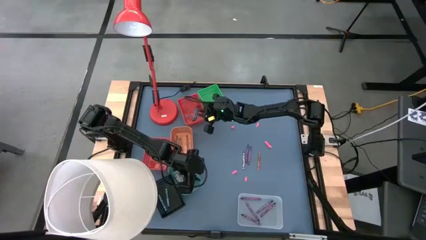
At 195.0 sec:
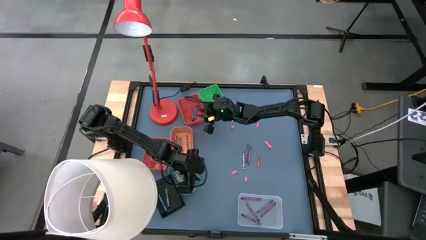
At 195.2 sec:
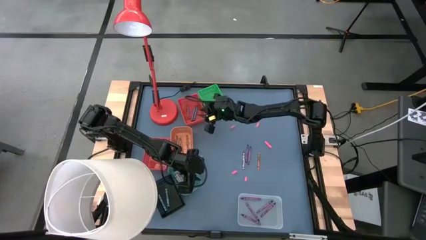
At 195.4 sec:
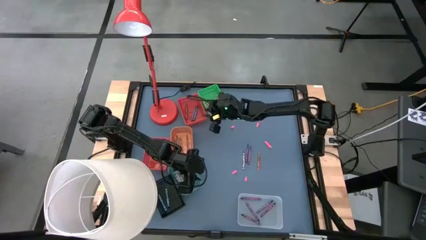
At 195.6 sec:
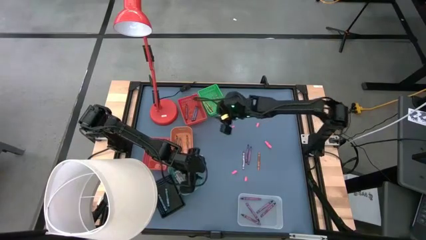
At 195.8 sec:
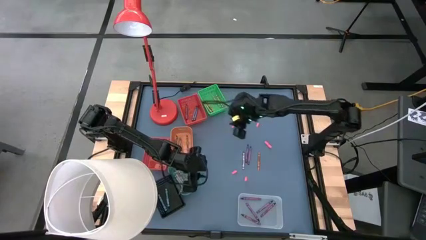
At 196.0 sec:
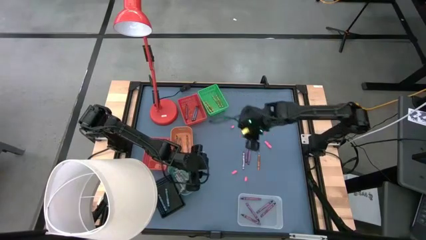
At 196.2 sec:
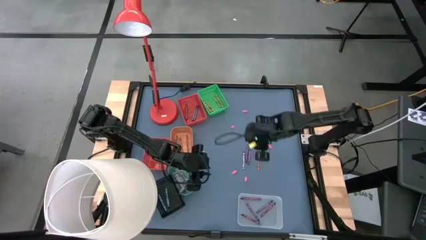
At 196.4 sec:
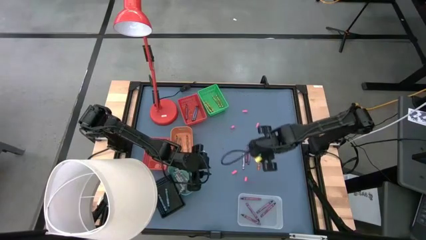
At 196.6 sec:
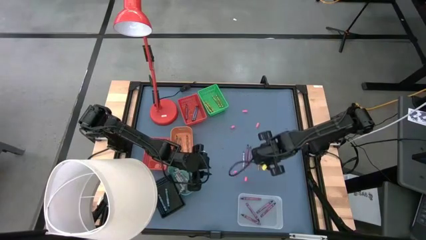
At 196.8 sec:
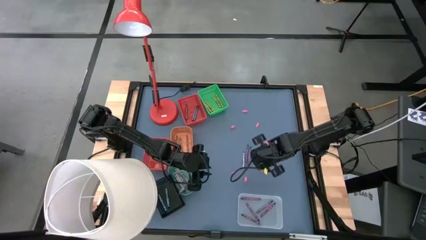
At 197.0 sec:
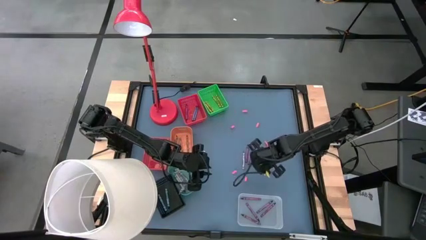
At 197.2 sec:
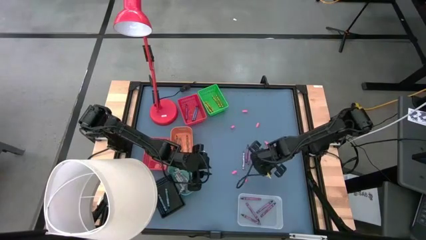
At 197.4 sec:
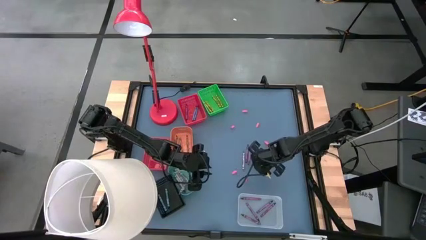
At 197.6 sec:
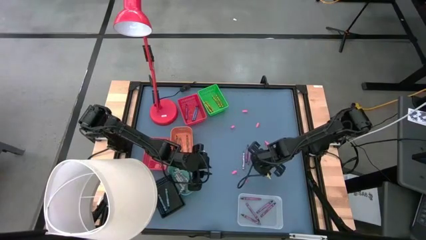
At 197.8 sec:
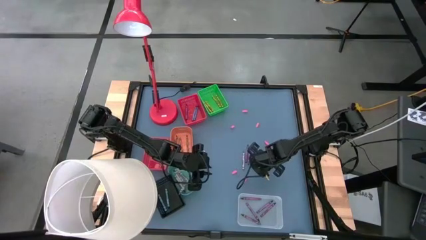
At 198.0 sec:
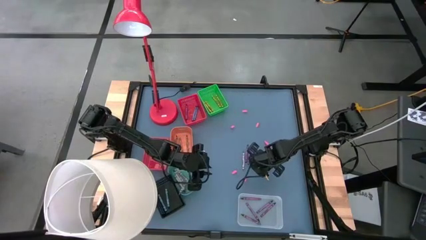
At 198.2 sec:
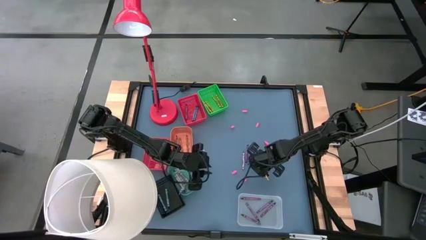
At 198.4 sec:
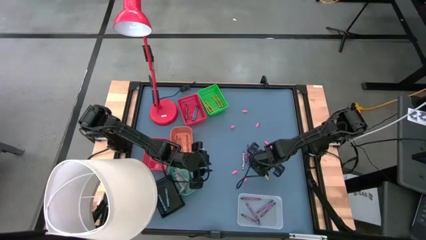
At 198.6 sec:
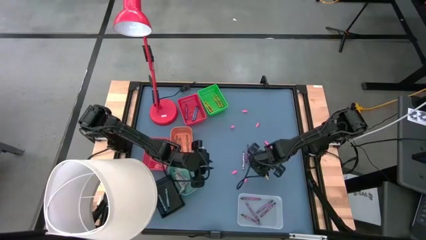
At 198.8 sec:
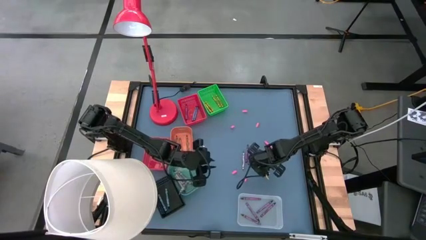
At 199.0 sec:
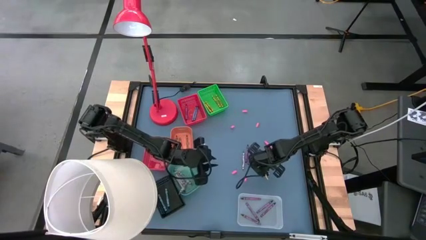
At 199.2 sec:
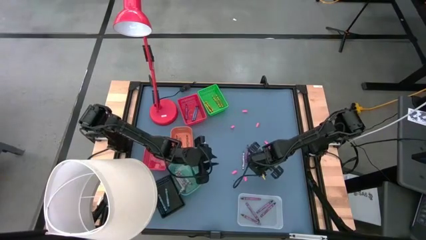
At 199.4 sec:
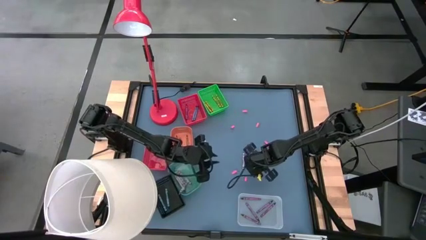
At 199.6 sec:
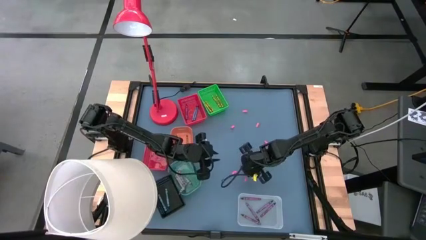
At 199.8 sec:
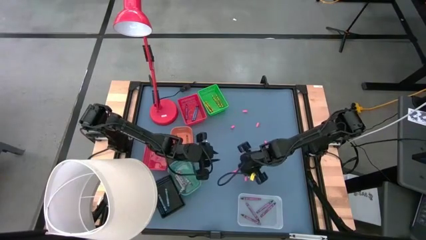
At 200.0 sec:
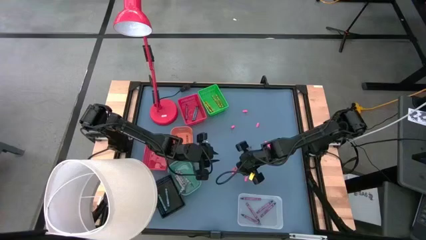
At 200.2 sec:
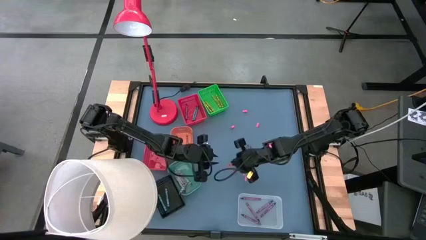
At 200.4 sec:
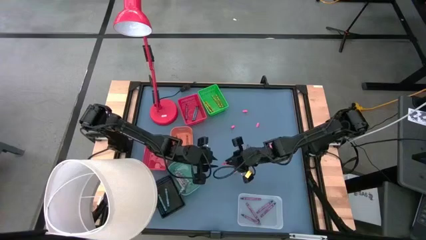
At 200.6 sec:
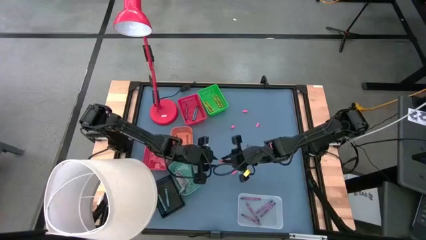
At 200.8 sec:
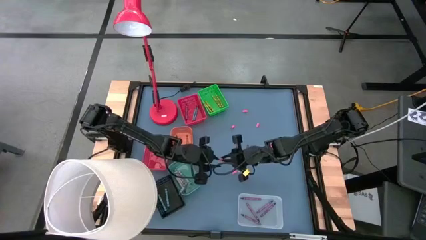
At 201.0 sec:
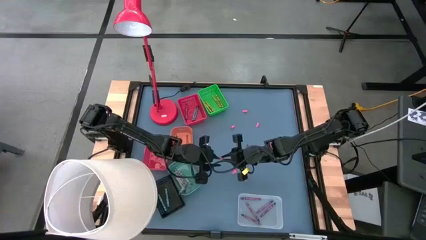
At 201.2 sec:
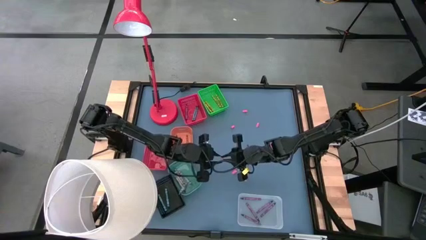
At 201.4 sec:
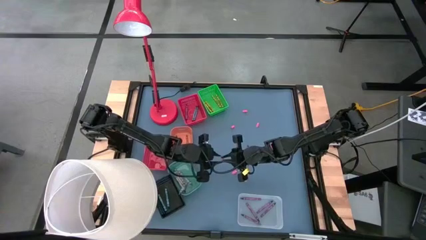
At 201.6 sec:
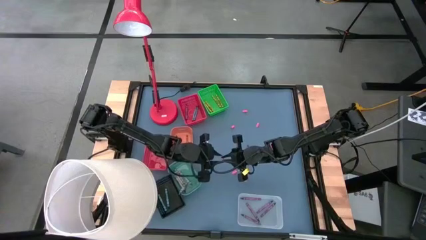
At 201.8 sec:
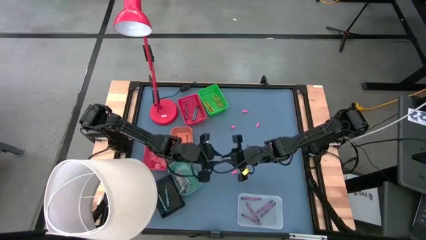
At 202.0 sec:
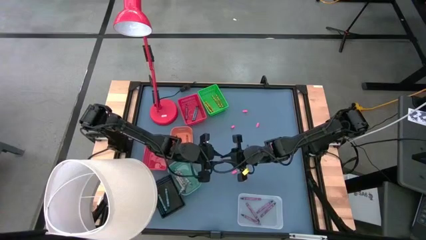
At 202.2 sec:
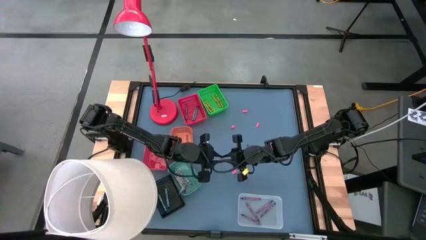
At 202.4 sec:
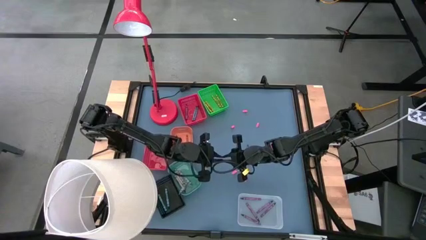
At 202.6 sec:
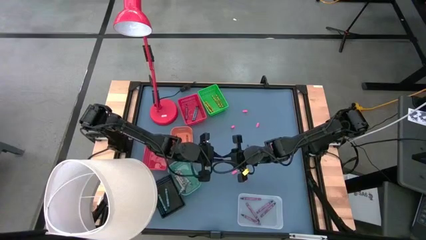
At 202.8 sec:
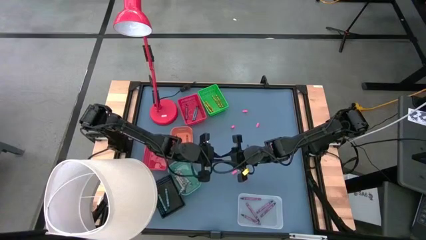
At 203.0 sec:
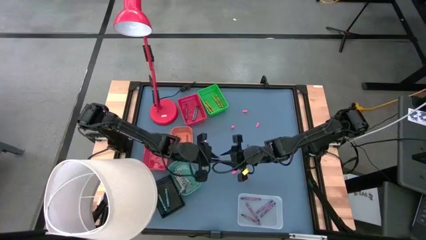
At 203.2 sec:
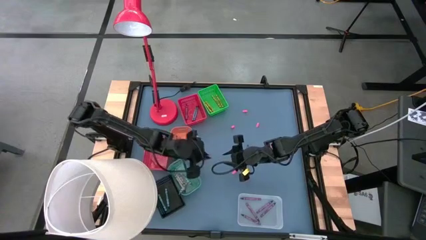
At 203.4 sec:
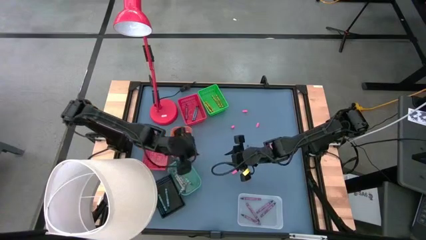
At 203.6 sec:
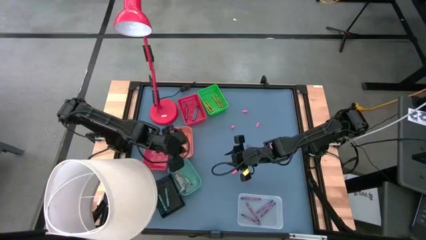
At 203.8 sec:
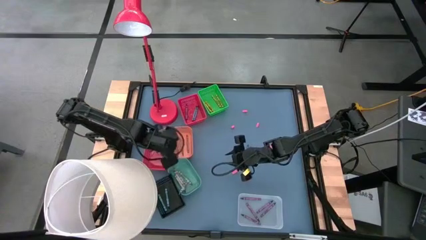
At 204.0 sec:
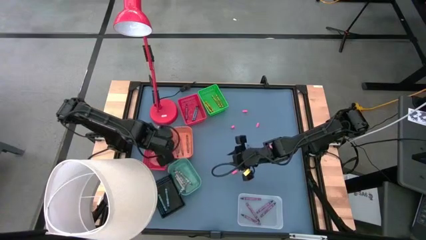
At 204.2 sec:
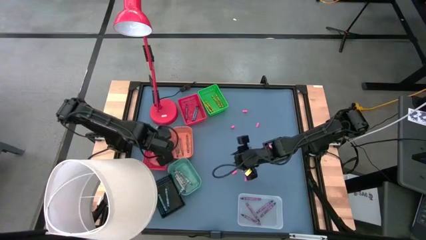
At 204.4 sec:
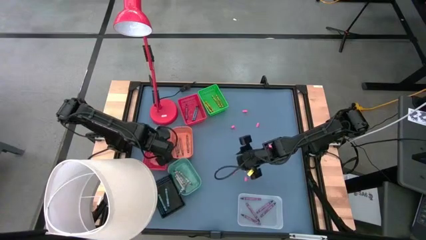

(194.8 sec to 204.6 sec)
Task: Sort crayons
Put the orange crayon into the left red basket

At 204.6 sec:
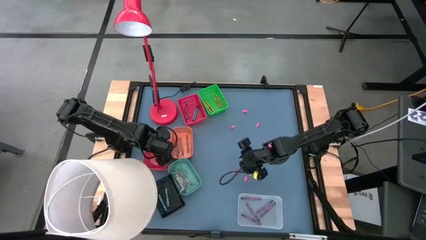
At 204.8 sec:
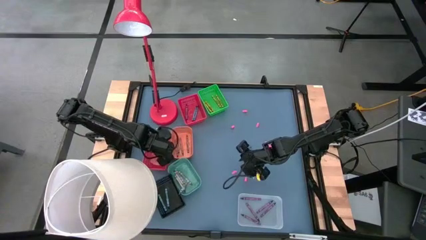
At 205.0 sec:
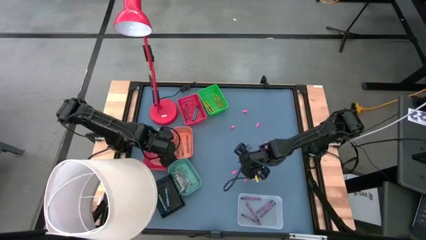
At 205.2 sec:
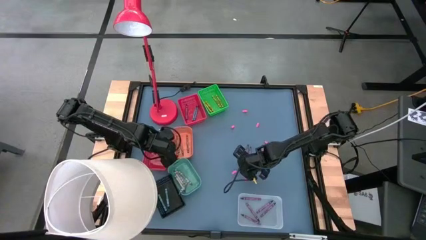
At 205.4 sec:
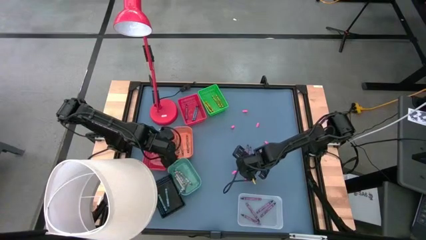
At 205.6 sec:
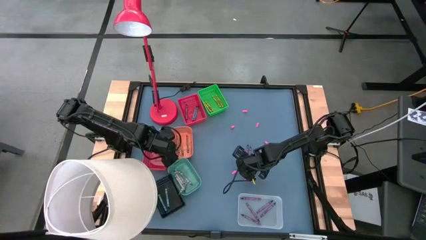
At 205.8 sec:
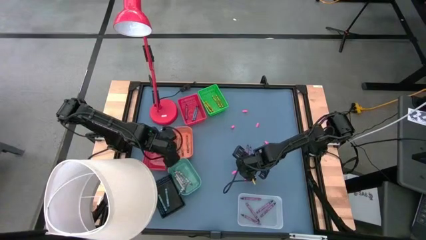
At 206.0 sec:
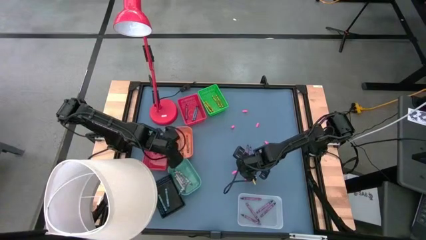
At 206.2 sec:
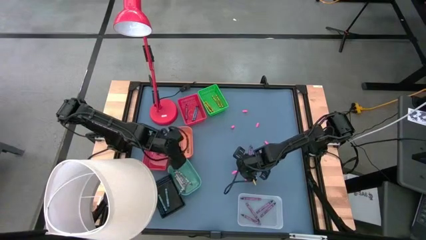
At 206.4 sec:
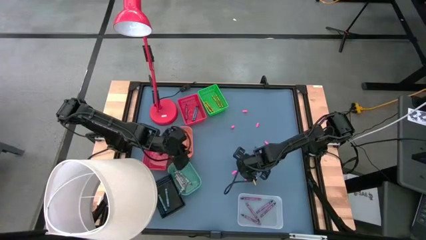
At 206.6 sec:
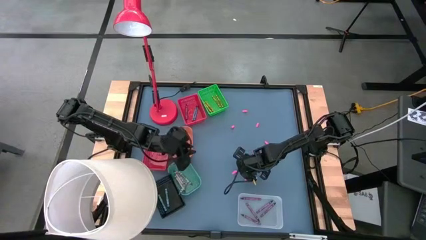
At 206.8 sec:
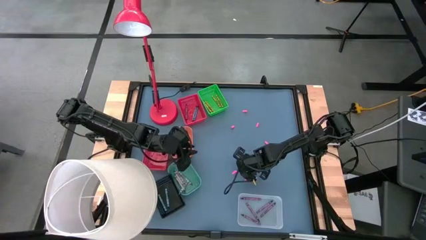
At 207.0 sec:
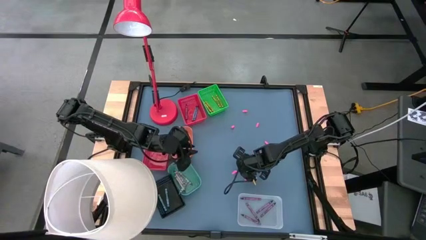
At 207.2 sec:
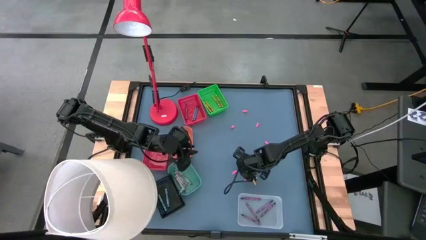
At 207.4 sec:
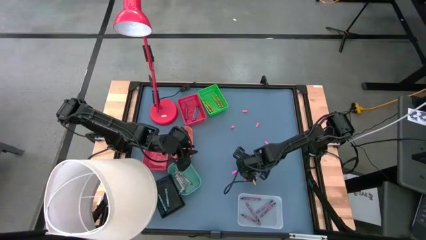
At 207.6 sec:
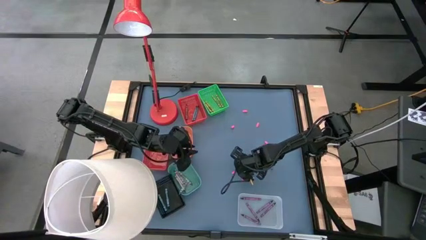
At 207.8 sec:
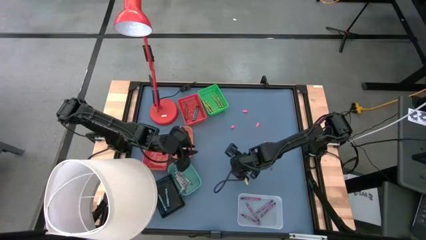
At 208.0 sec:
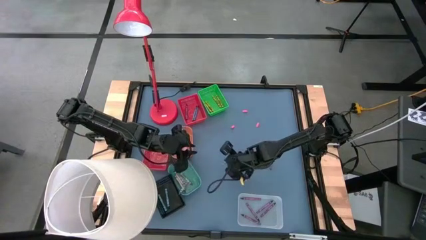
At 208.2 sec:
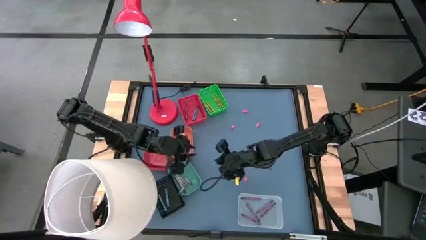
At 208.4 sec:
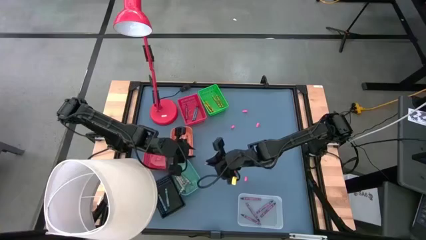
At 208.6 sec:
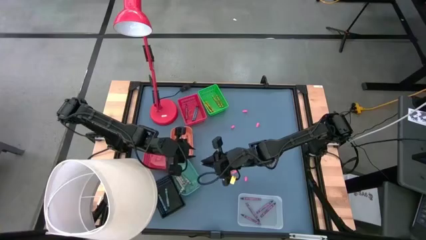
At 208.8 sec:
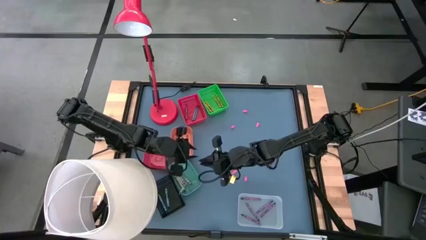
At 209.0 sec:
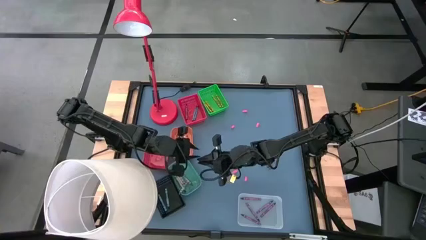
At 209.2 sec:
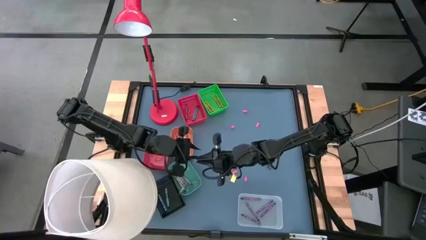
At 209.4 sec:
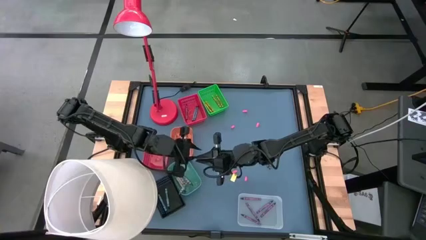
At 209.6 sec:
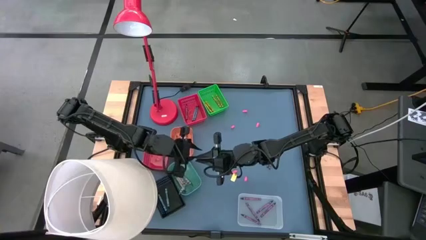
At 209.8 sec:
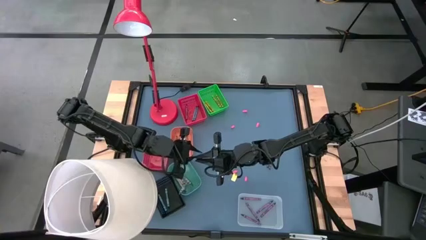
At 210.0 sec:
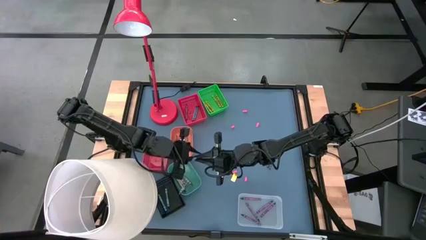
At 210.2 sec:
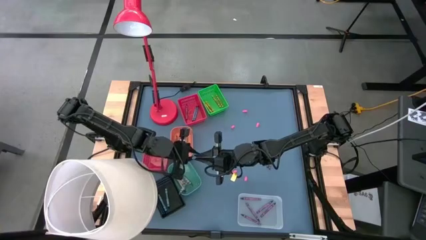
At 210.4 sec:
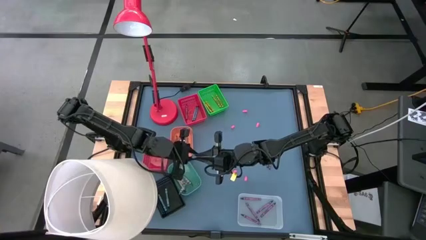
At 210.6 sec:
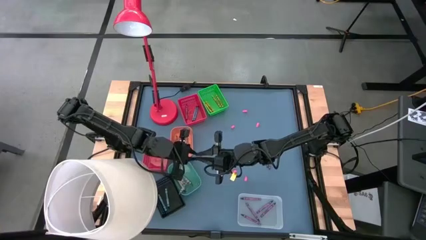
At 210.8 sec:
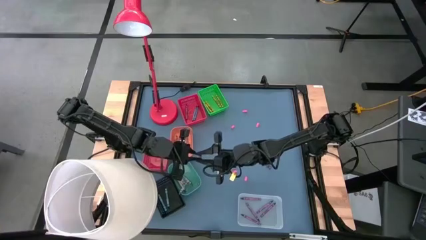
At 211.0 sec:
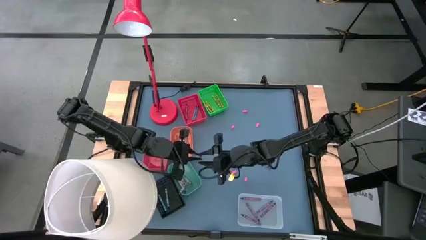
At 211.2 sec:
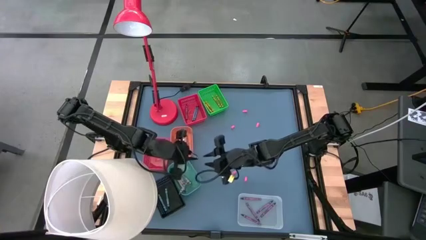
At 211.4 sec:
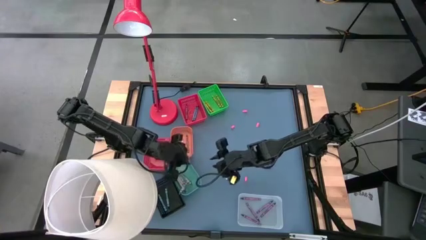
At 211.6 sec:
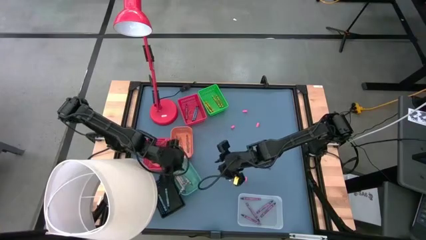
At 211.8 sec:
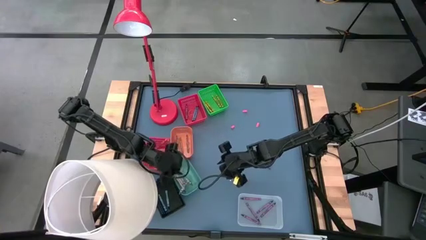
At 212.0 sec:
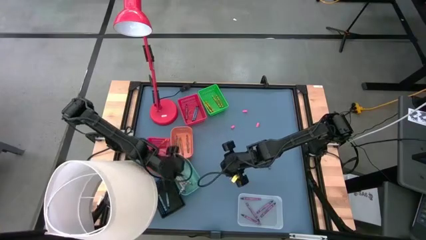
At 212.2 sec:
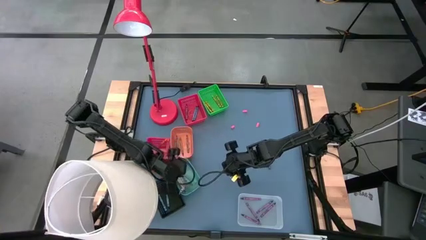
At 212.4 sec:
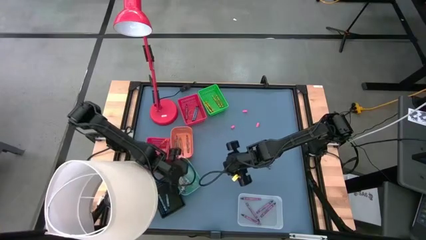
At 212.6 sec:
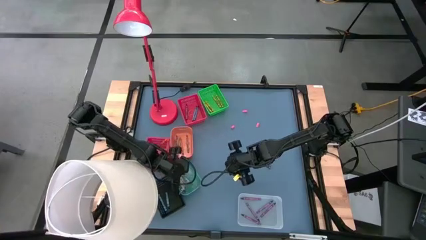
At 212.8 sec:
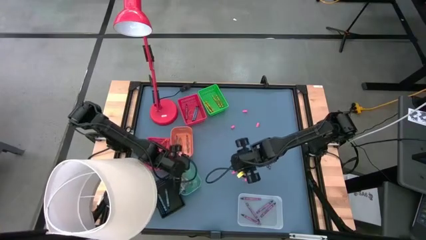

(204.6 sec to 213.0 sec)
Put the gray crayon into the light green bin
